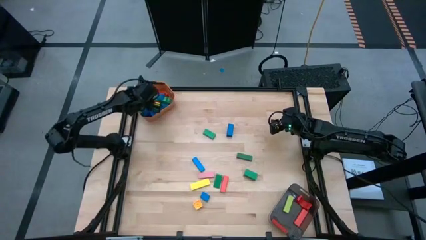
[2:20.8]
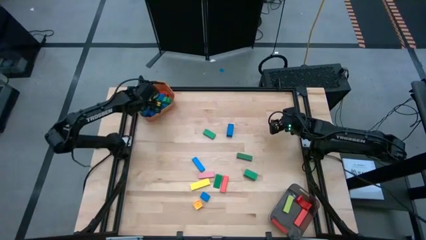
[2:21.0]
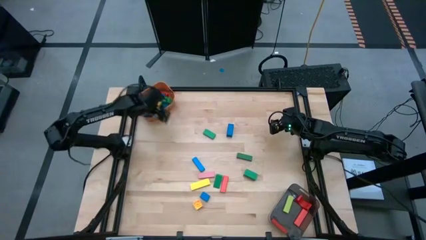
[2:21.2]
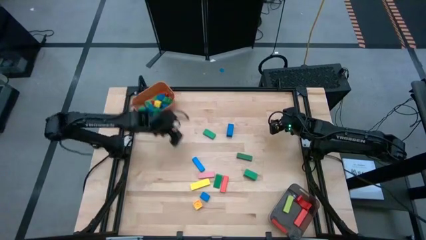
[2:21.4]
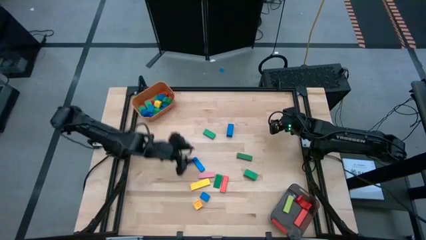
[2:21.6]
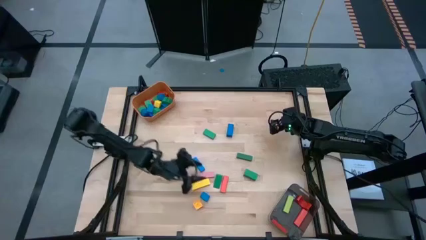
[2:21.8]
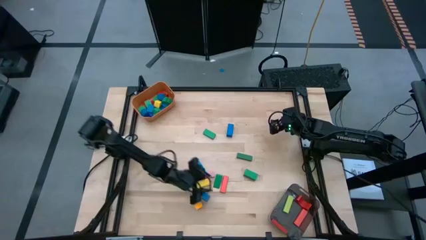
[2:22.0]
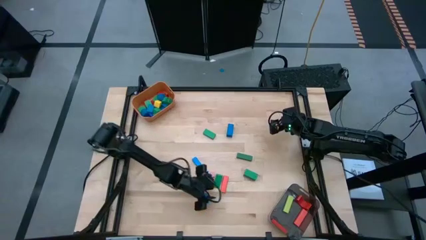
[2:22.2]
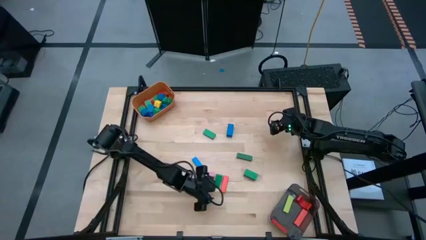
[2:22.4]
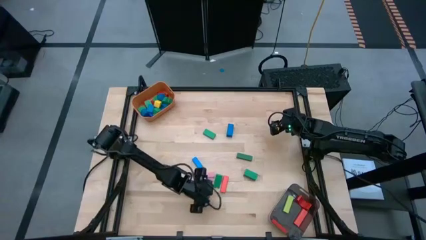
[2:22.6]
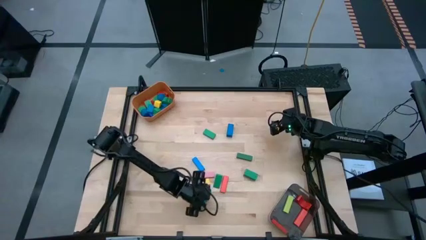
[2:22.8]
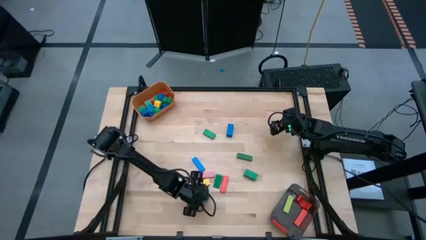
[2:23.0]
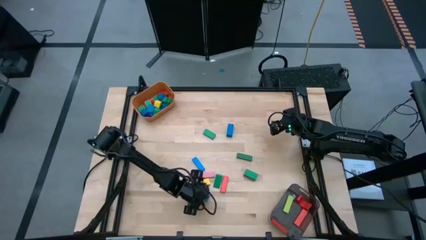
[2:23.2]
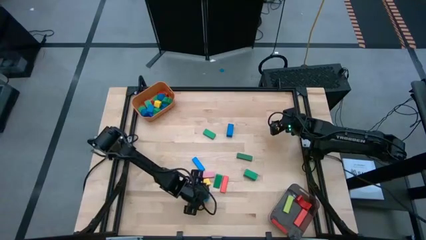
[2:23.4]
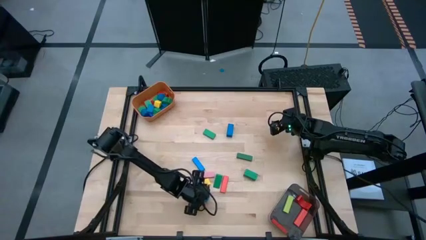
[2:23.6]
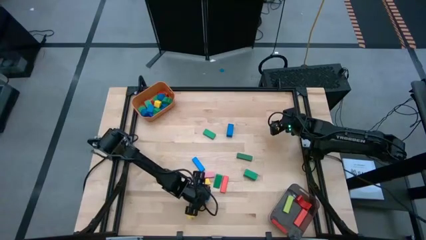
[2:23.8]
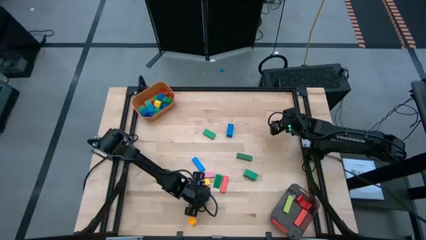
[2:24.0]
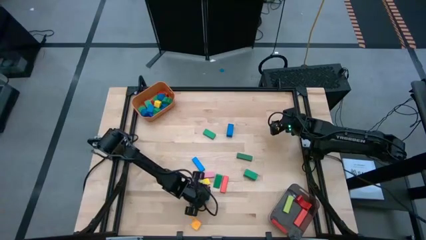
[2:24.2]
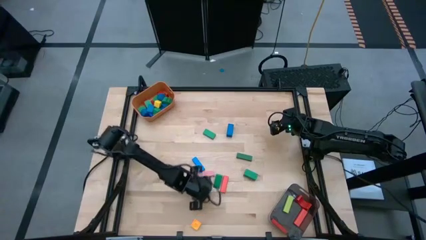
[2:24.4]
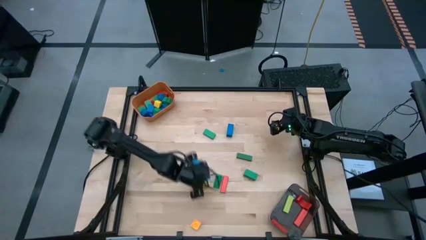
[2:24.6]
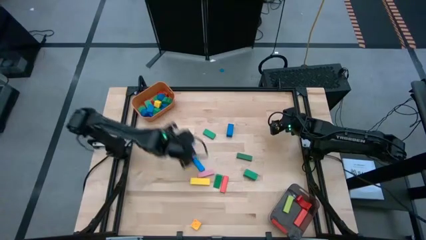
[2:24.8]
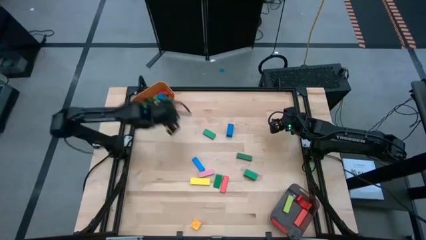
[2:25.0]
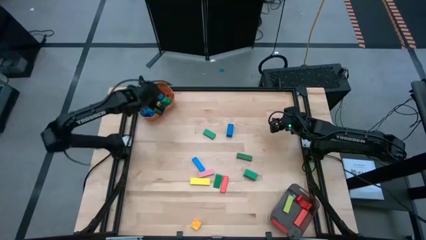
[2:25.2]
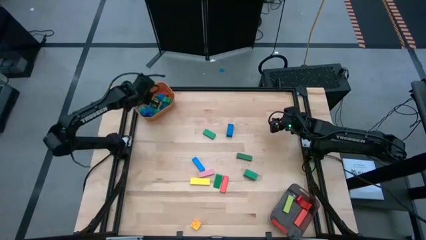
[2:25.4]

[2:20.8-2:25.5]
Task: Sort blocks by size
Put the small blue block into the orange bin

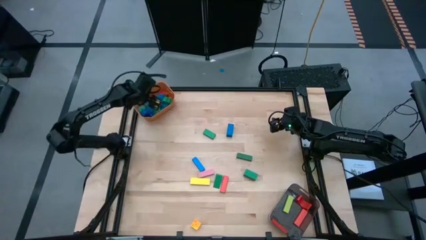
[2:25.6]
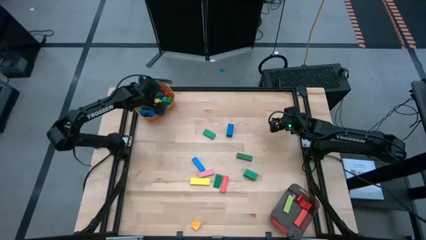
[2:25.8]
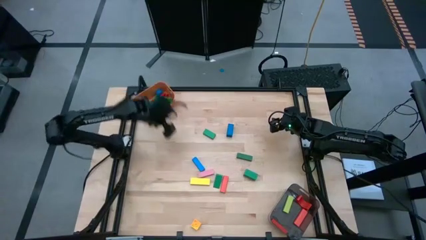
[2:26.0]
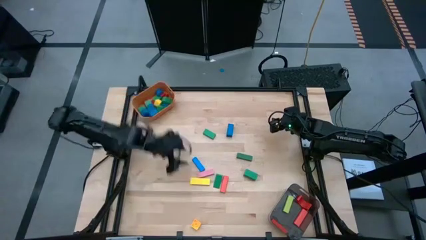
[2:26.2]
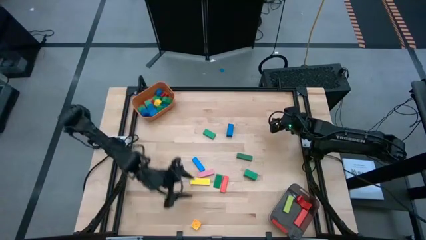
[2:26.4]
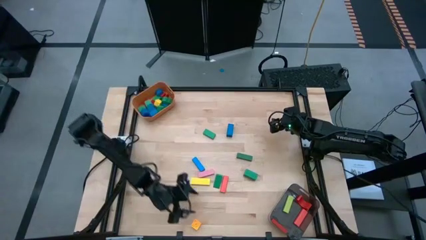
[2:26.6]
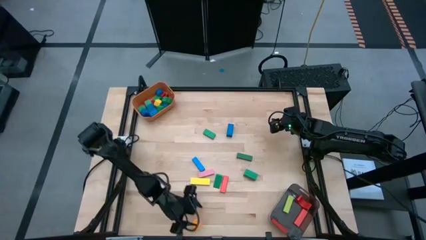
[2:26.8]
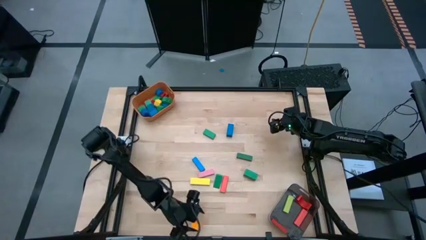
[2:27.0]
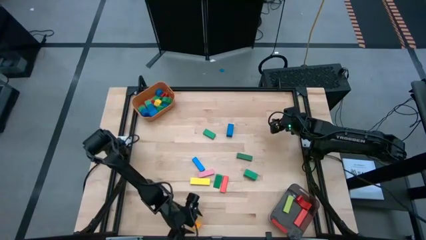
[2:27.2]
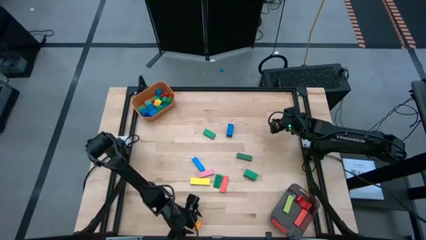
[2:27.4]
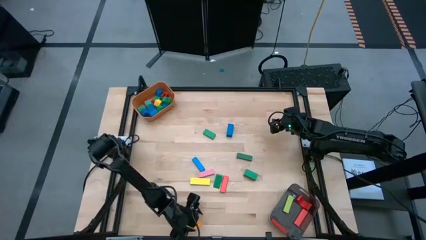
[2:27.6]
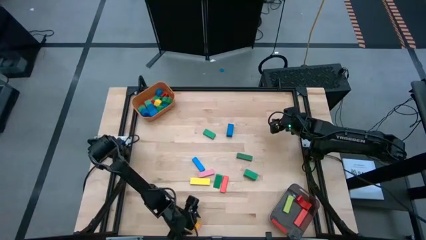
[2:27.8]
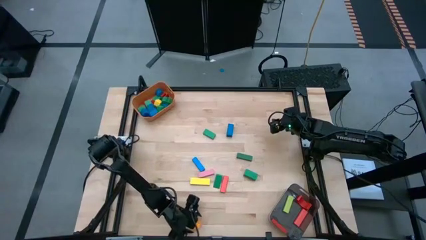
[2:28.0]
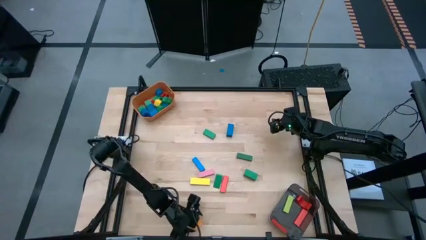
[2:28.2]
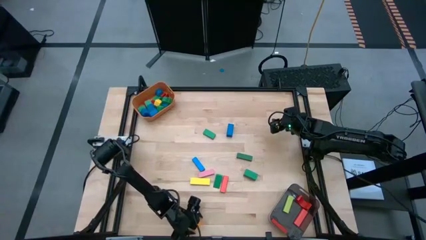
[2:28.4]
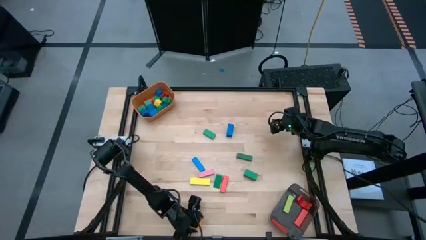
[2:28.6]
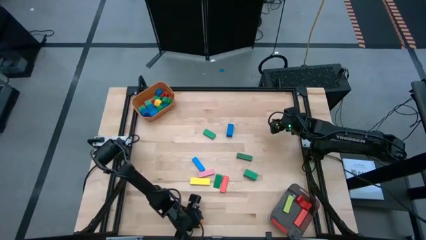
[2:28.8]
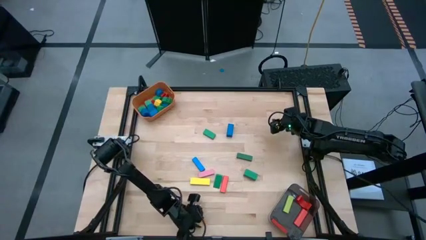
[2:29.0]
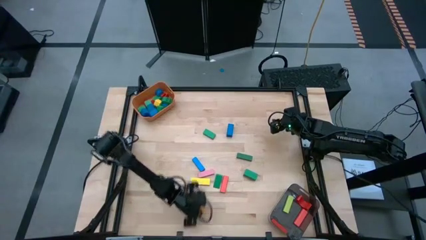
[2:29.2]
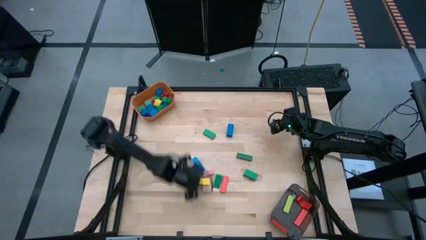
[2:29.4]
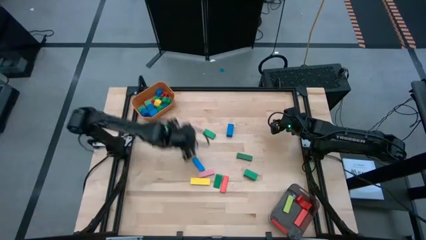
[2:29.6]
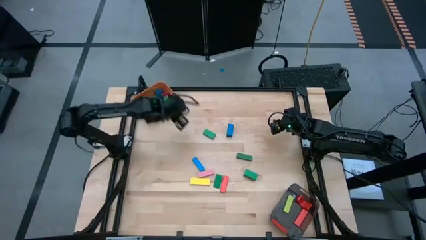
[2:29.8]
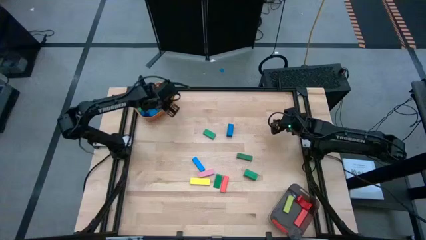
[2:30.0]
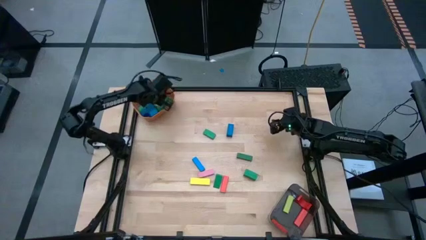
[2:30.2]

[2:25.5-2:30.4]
Put the small yellow game piece into the orange bin

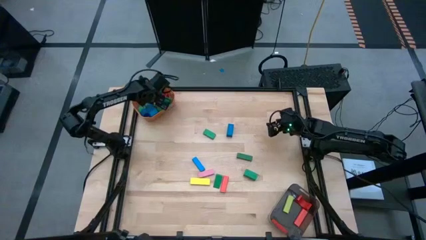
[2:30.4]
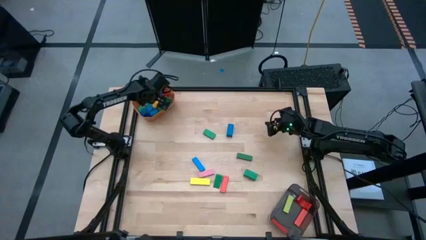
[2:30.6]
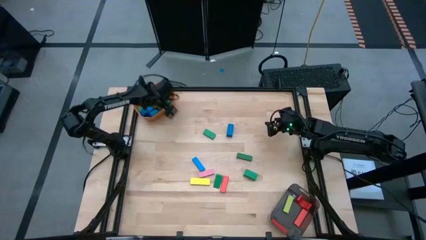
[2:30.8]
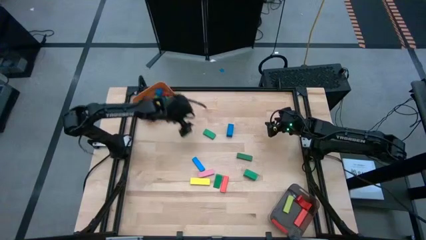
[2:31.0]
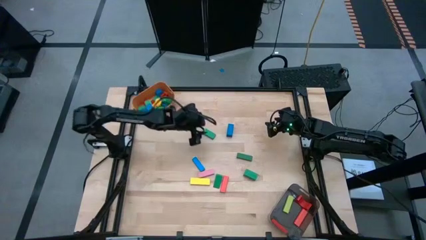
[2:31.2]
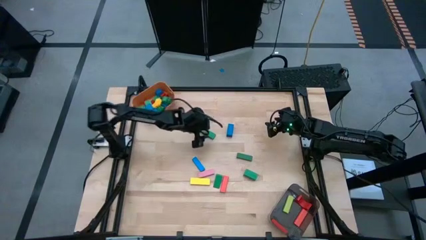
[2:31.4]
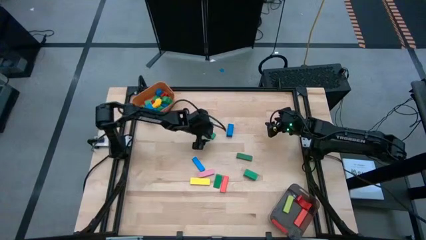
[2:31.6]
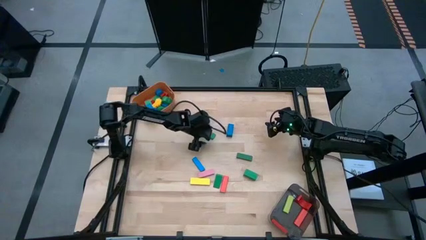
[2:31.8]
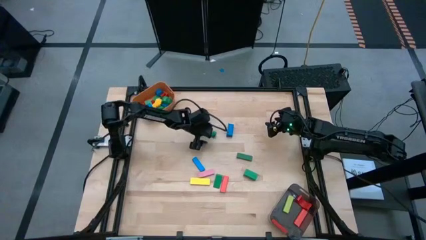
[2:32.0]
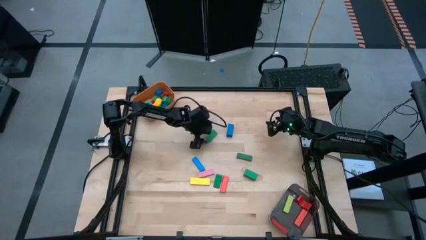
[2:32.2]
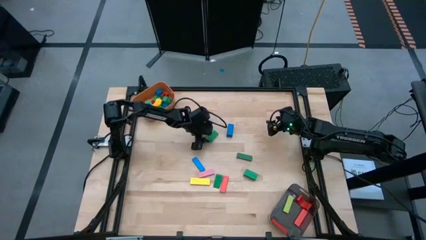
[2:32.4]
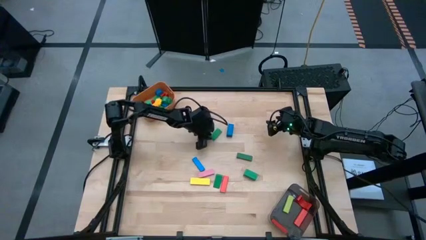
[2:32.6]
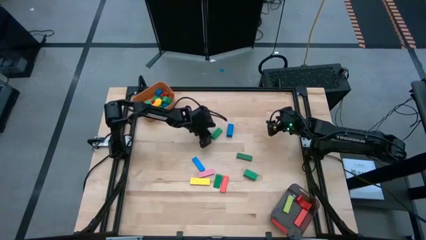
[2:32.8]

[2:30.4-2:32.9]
Put the big green block into the black bin

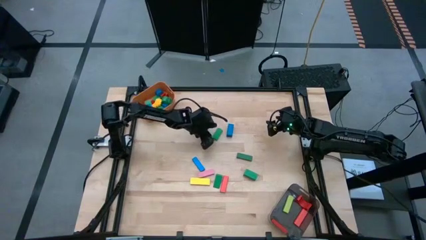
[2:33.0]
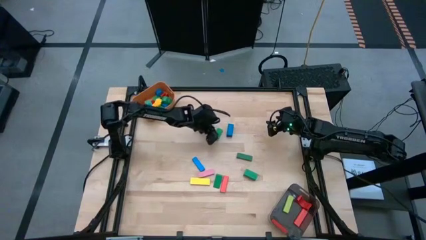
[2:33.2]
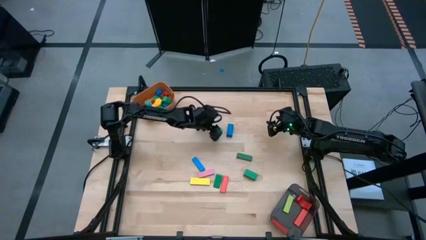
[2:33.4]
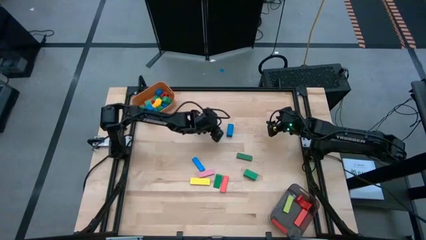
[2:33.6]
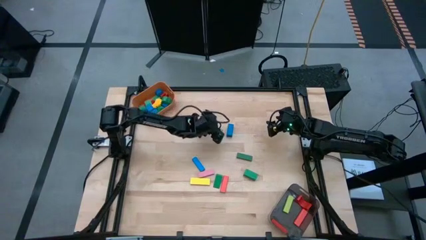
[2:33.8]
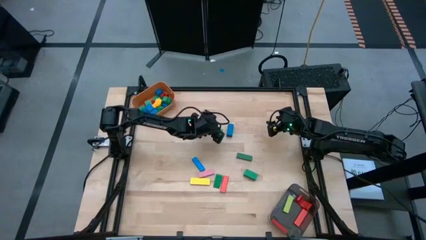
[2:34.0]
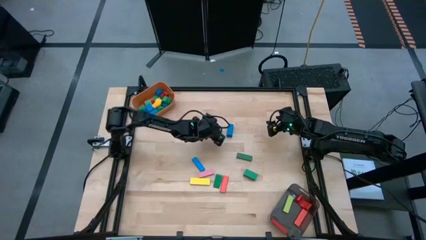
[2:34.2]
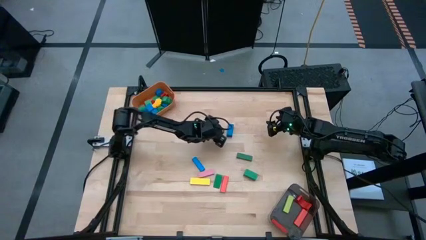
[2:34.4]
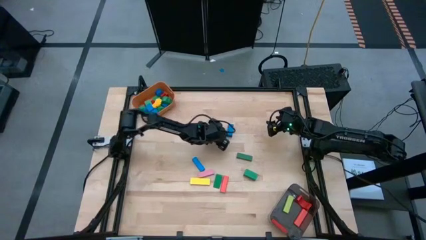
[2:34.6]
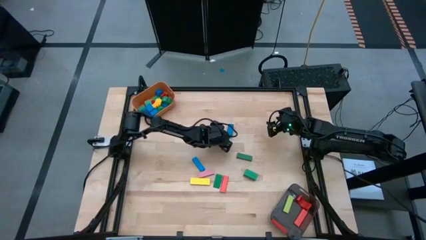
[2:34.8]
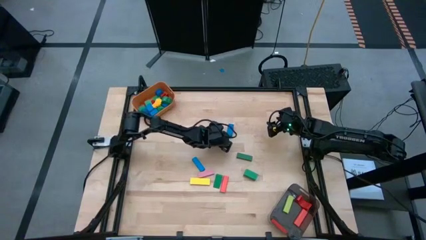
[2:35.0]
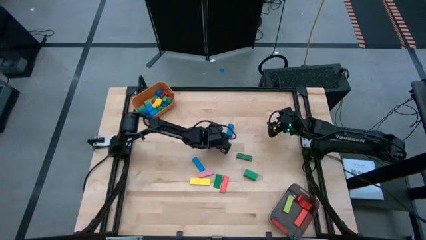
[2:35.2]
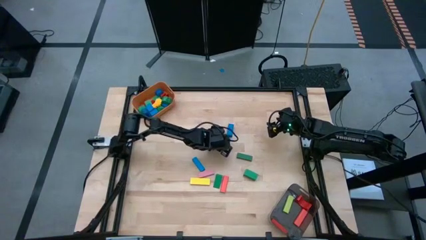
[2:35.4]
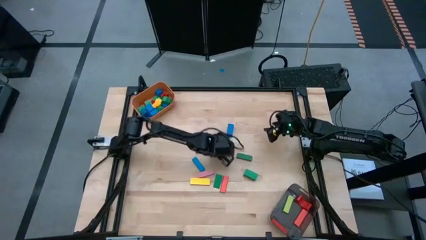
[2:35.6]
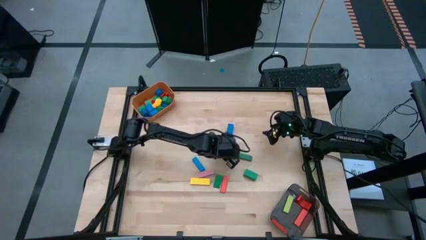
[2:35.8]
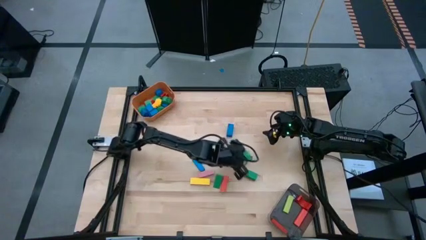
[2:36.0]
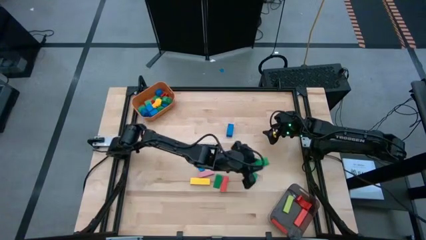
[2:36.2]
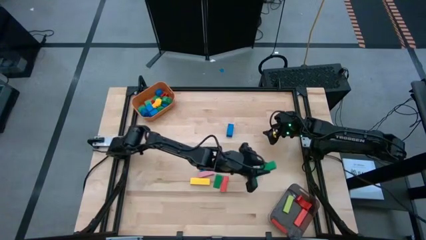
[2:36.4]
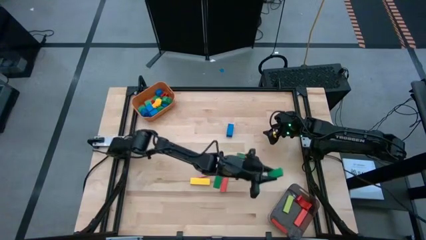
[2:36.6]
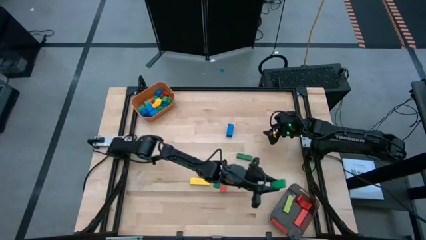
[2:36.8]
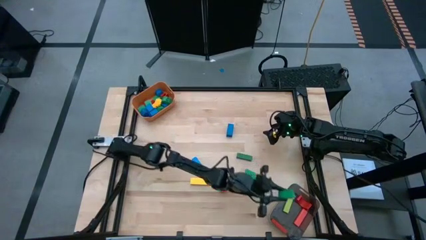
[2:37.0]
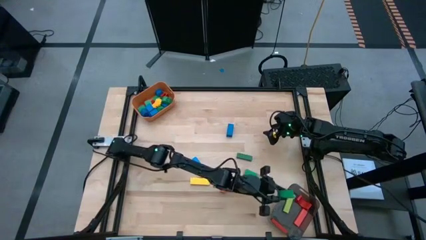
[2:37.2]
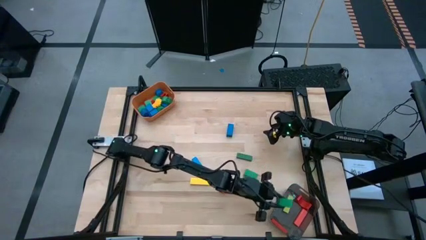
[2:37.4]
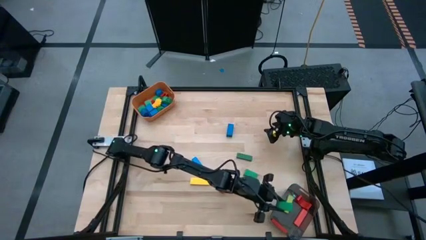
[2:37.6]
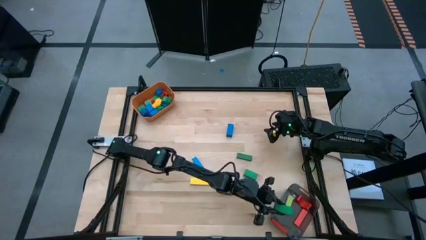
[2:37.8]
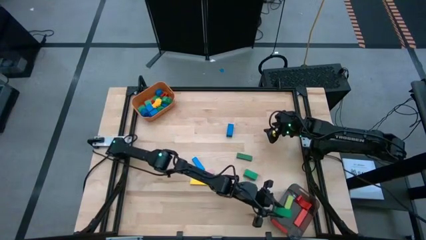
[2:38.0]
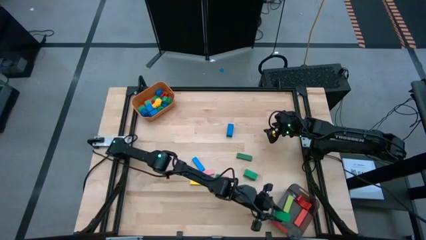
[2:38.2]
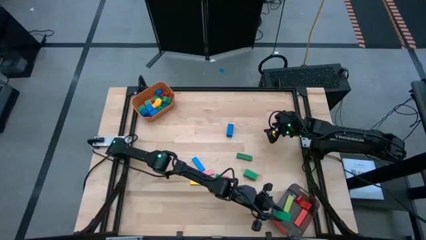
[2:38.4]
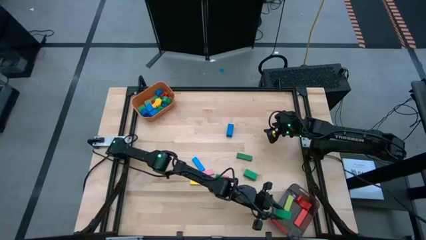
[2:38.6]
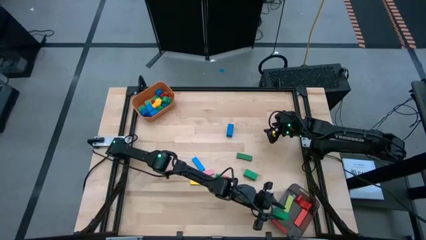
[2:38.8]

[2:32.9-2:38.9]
Put the big green block into the black bin
